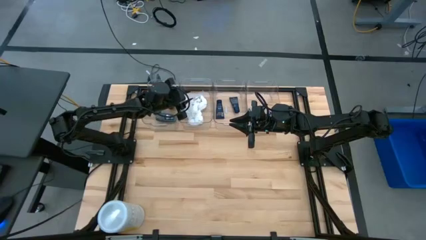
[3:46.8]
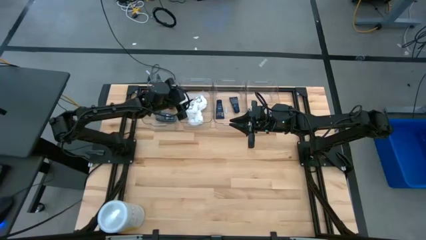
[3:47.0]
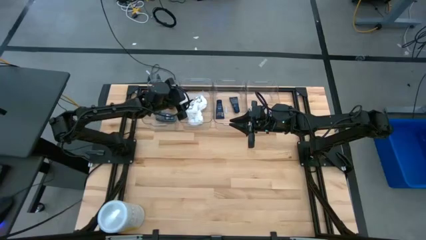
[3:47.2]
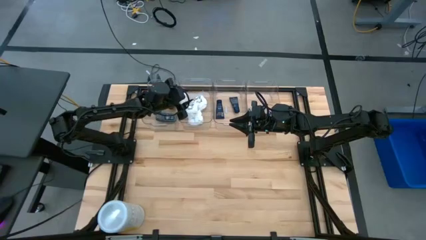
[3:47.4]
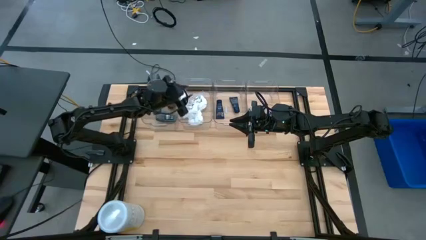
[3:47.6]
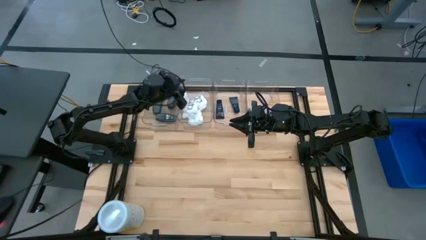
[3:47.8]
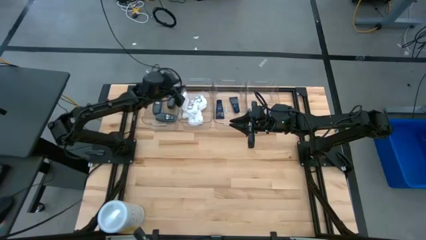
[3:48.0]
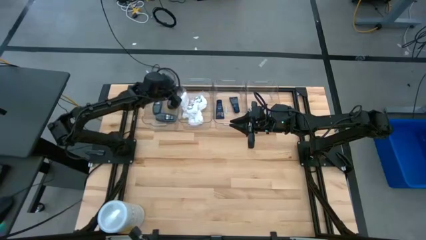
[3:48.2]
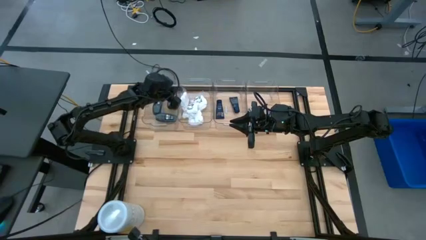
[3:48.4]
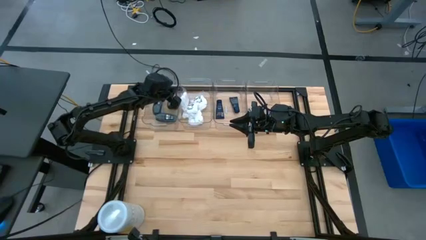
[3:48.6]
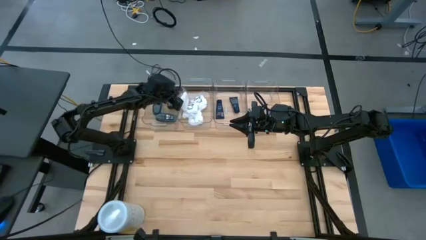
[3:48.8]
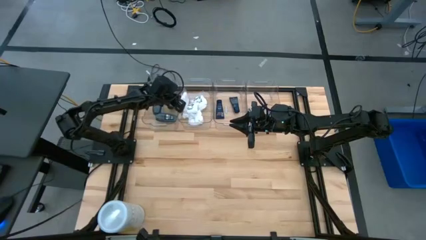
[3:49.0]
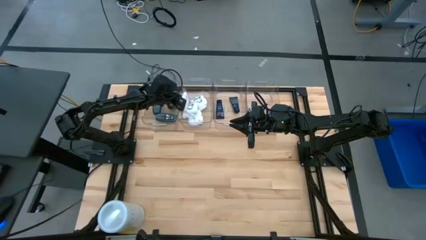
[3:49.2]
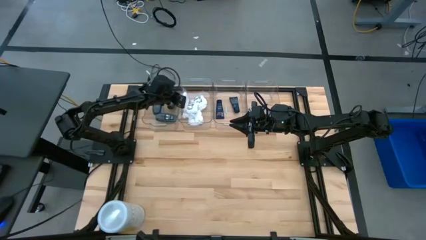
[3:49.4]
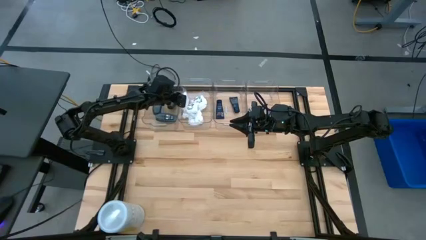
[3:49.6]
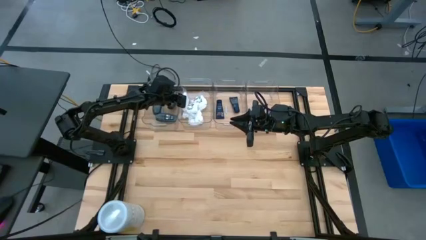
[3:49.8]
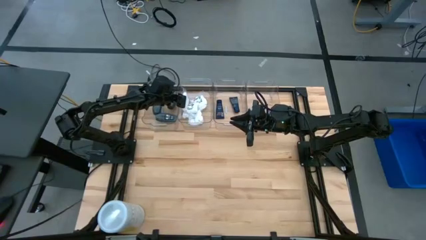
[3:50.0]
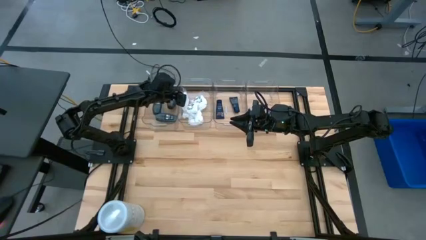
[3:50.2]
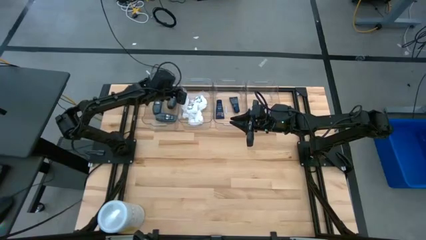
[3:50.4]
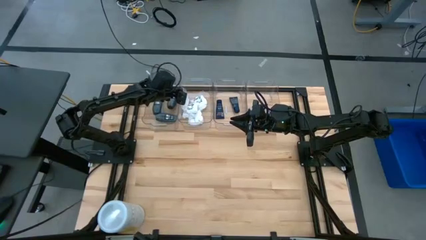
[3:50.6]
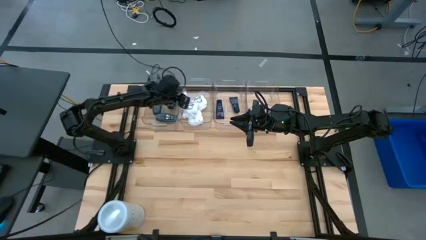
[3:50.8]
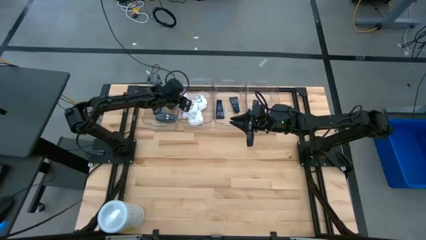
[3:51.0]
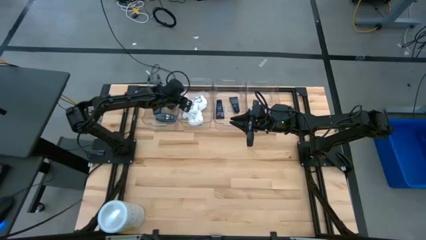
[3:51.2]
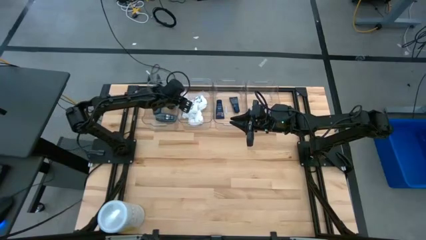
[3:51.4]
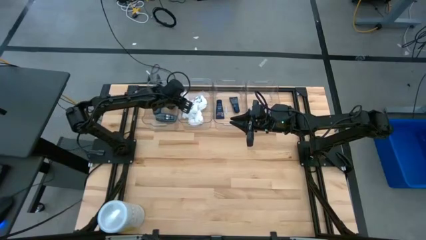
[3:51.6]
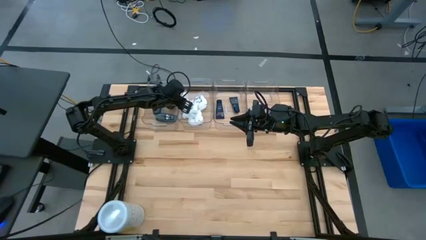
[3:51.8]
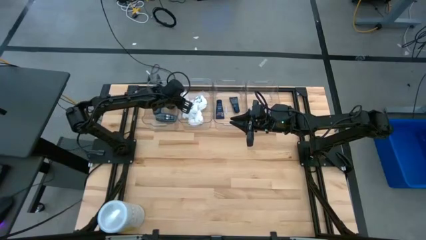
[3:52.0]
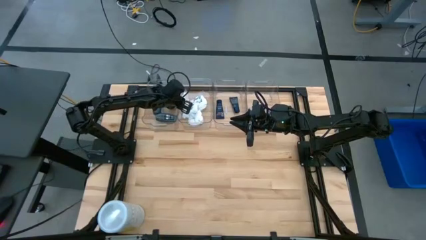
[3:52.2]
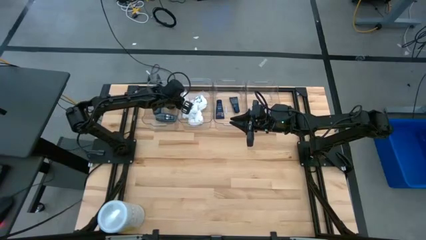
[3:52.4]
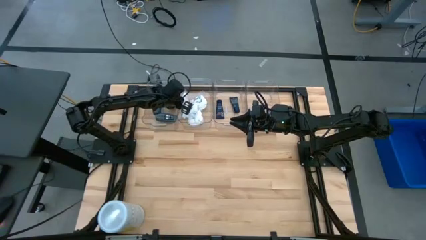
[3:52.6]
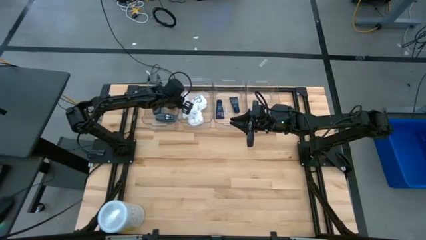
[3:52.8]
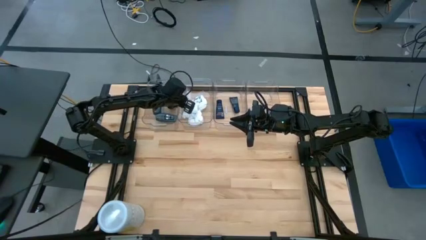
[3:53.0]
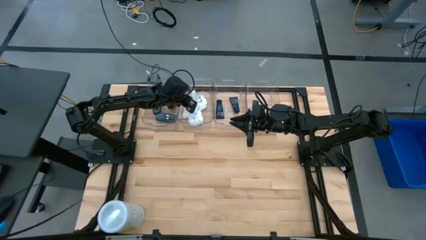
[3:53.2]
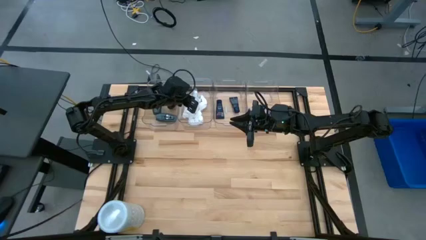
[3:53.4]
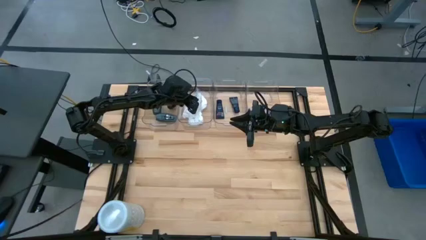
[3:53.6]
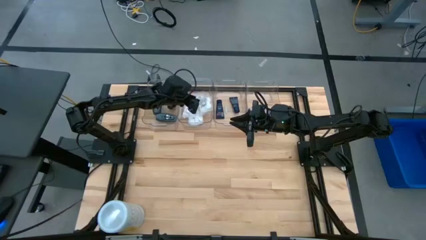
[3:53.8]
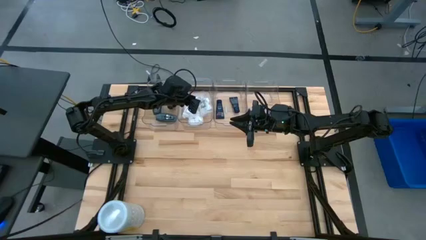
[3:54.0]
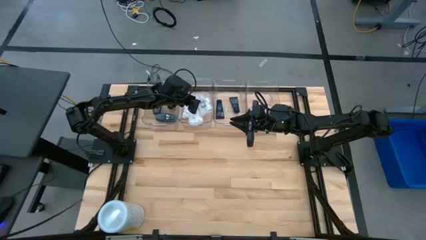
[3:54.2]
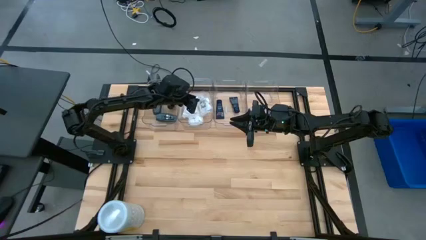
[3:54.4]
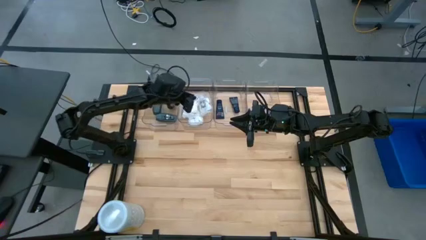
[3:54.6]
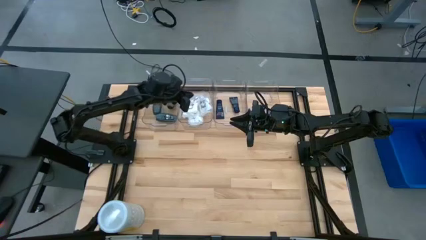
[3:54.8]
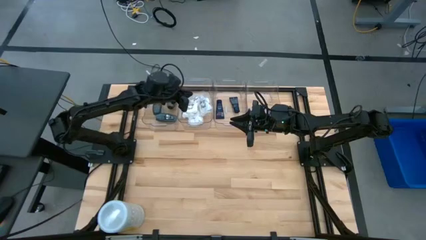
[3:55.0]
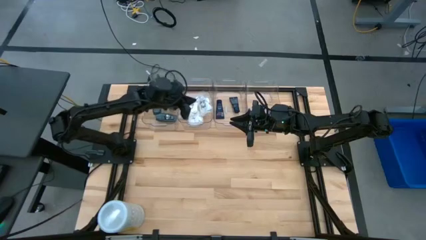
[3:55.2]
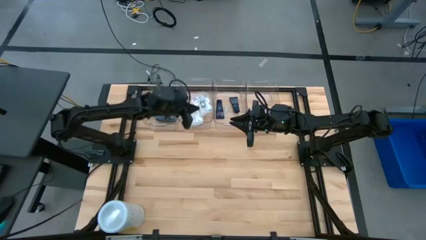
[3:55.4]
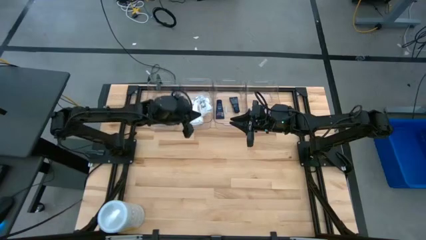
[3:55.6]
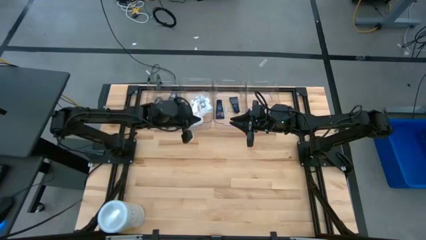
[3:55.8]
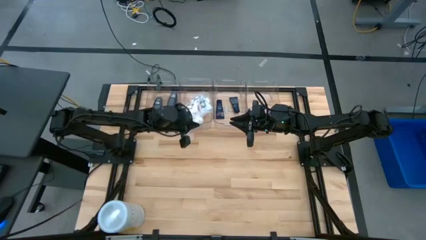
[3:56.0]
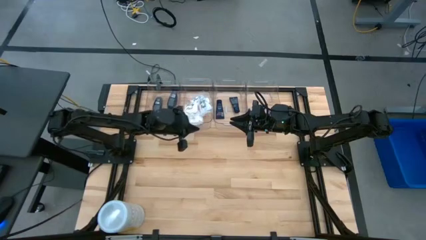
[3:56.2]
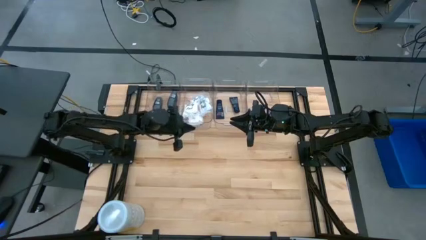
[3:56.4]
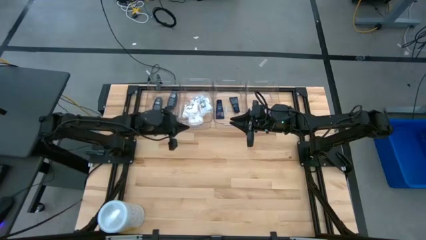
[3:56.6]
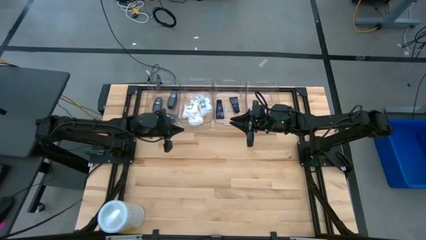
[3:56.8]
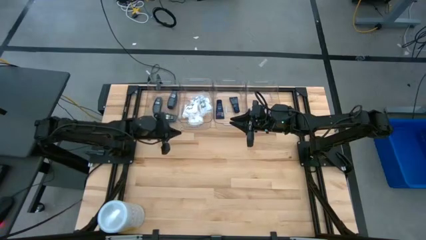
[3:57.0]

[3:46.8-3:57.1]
Task: Pick & Place Travel size toiletries
Return to home position

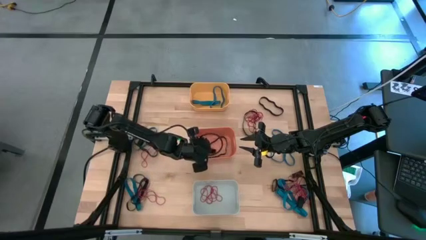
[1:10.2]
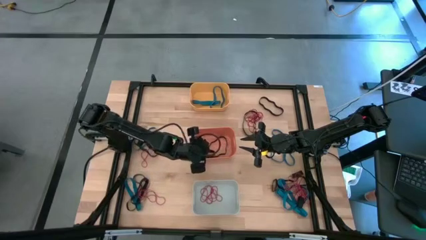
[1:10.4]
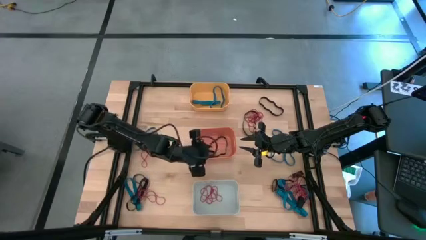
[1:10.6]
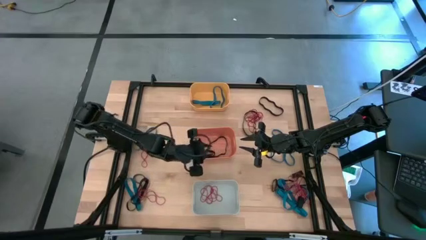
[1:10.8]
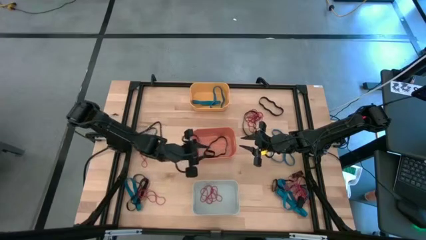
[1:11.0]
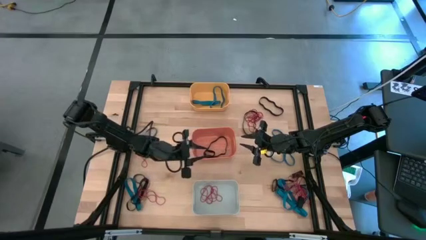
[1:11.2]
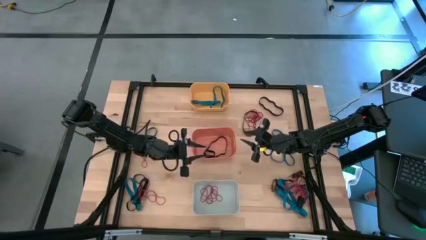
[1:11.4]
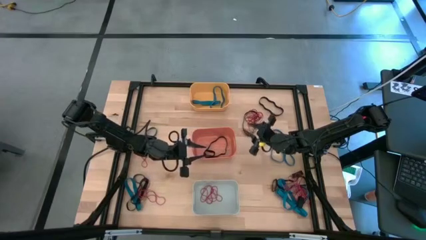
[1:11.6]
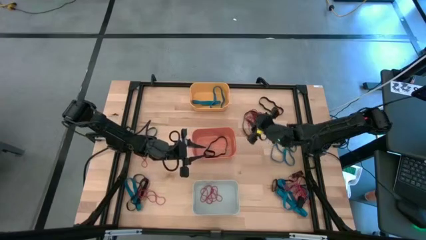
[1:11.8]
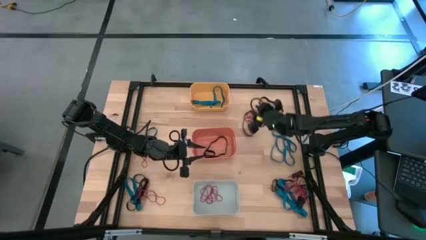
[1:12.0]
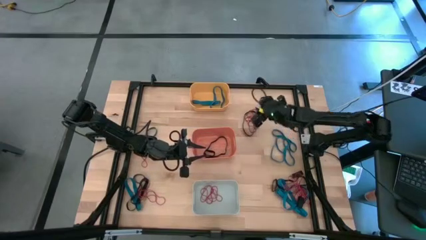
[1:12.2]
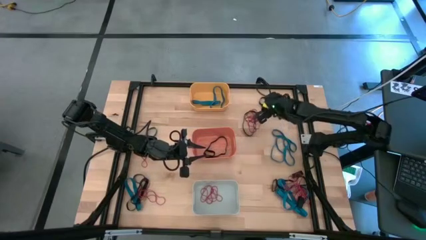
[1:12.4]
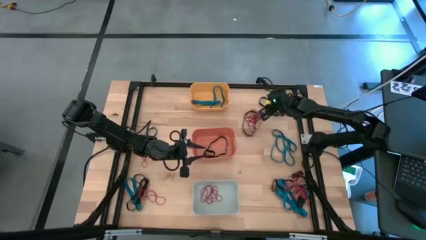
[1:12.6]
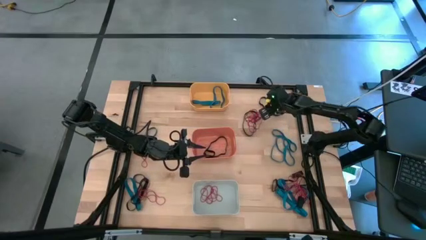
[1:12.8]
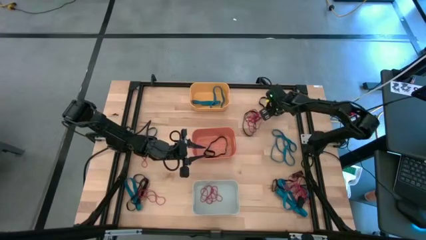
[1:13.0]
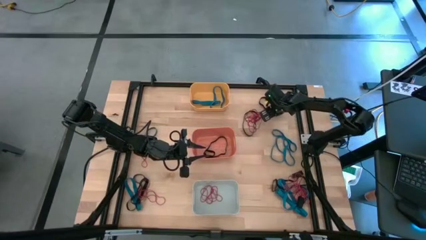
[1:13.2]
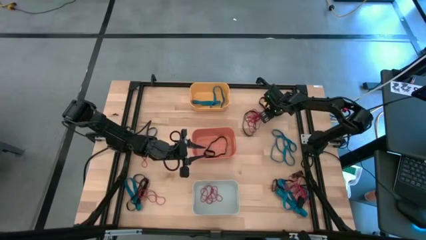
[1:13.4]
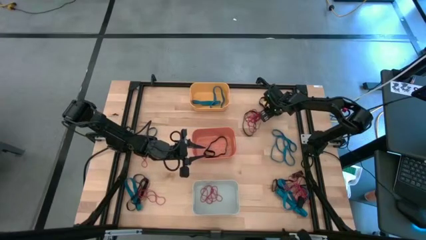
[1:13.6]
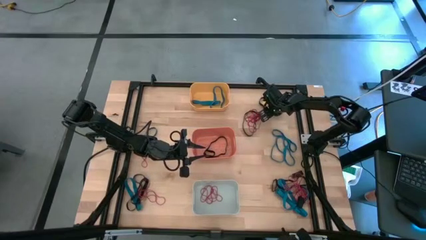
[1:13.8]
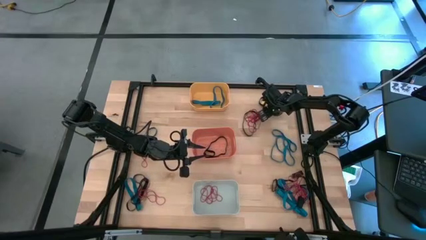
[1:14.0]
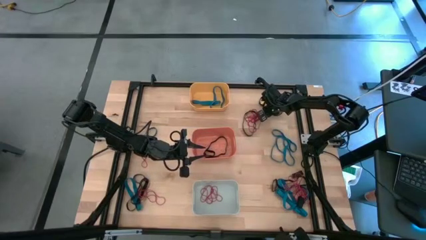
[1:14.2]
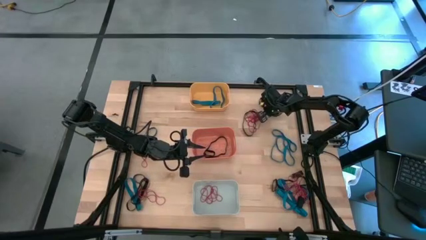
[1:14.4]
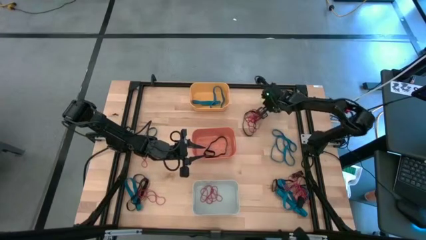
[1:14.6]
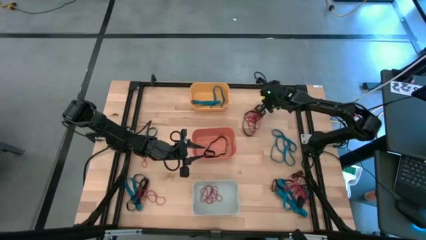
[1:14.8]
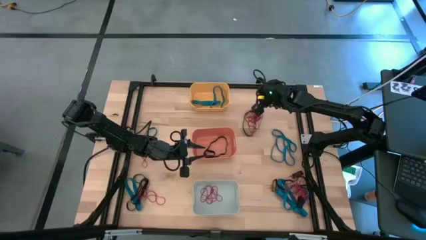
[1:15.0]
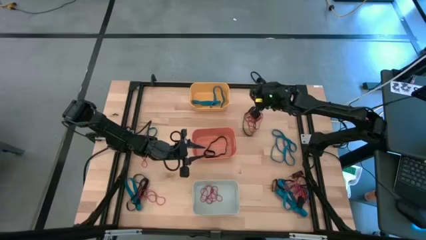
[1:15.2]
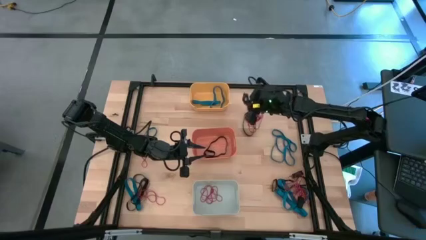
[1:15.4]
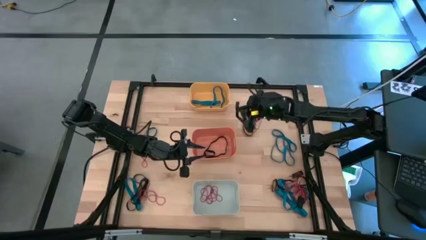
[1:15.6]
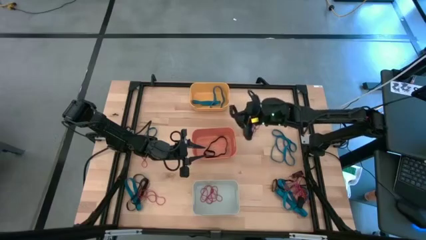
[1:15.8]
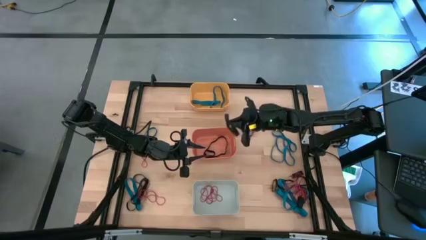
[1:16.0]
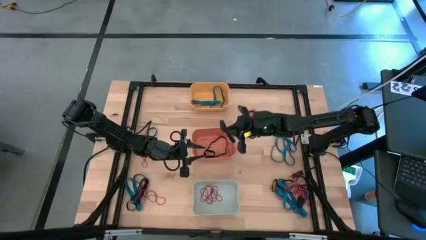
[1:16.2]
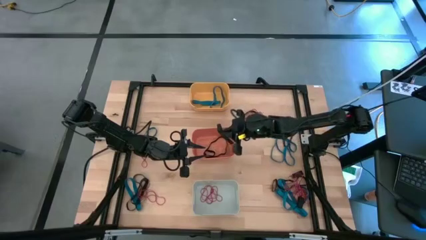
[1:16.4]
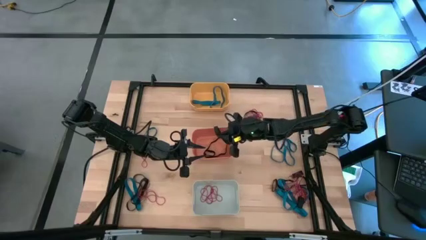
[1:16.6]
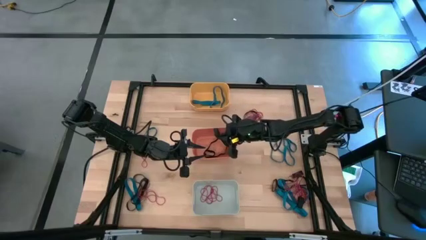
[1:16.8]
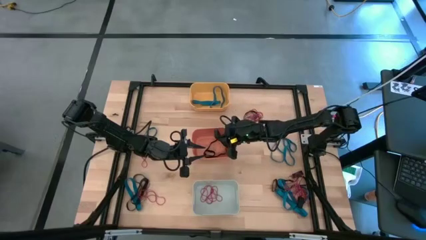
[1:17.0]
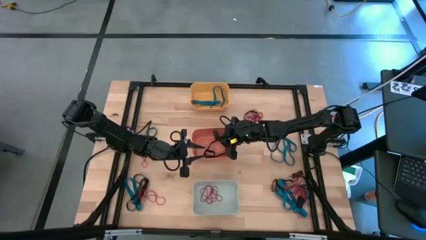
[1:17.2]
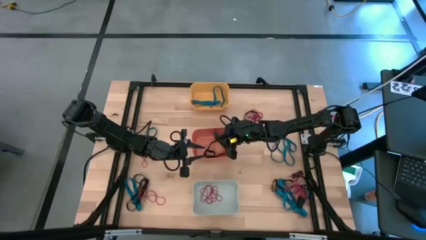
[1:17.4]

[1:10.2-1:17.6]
Task: Sort rubber bands into baskets
Put the black rubber band in the orange bin
